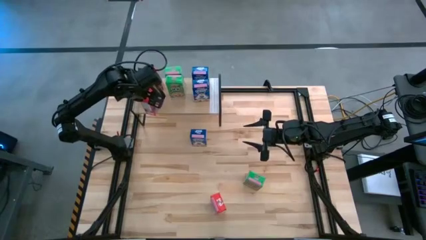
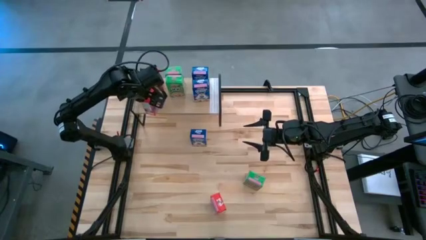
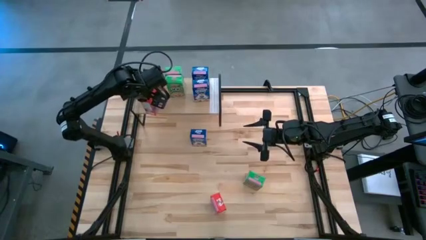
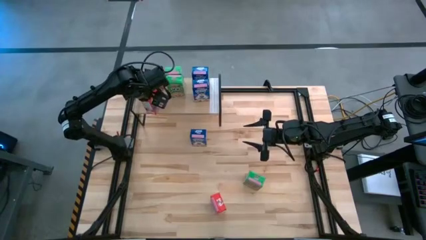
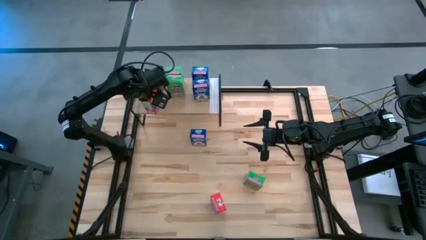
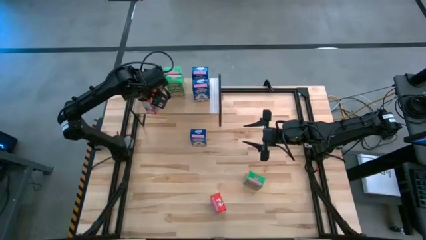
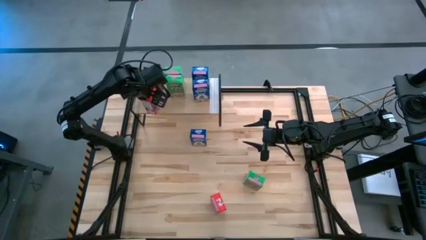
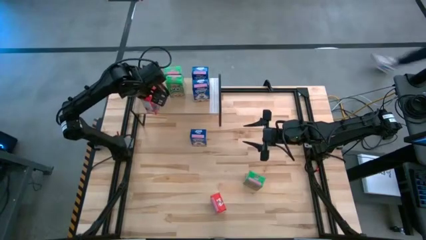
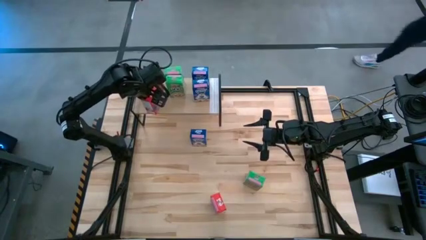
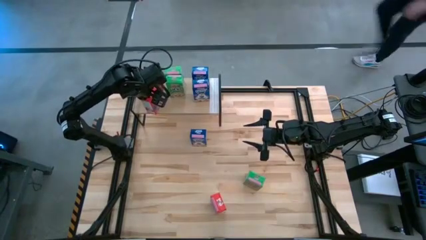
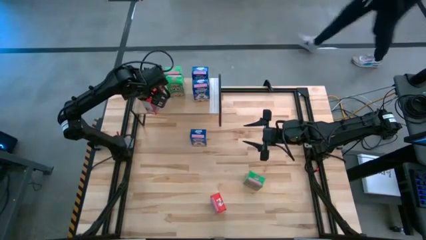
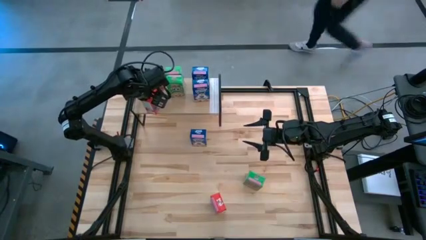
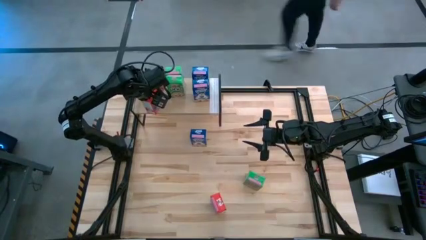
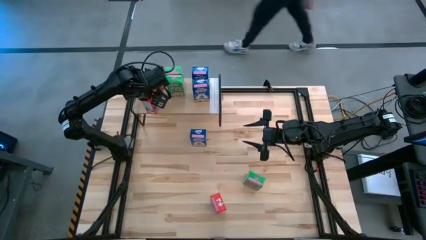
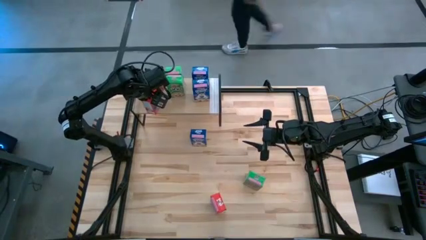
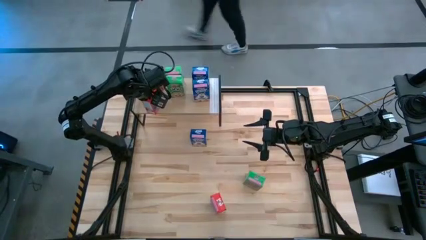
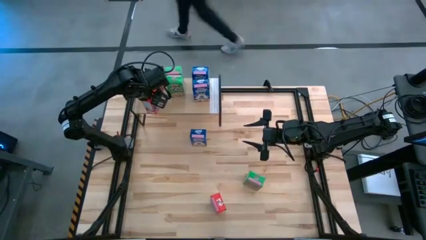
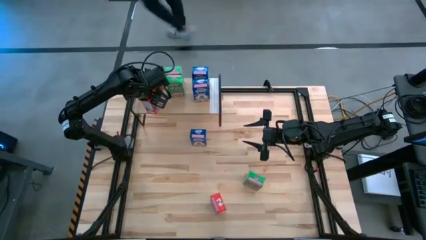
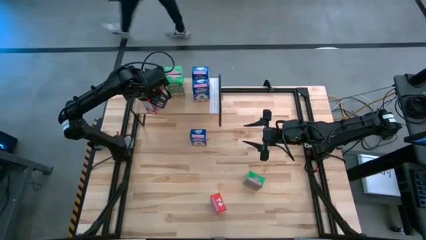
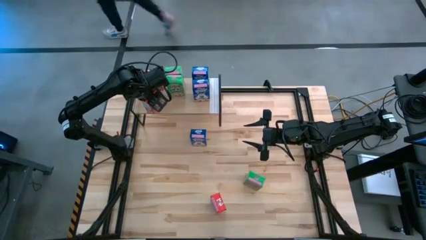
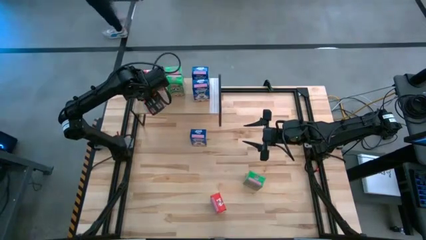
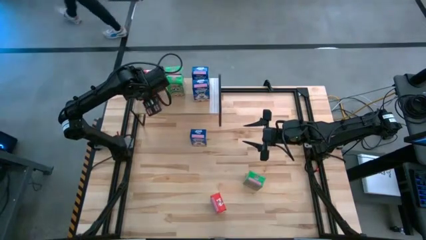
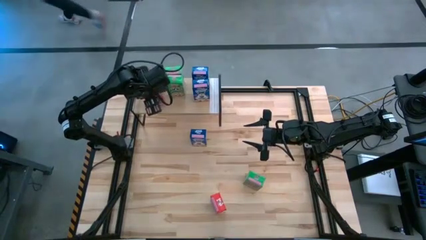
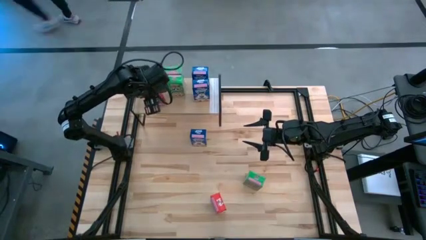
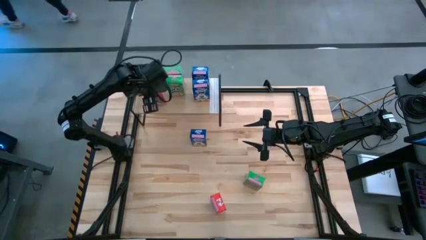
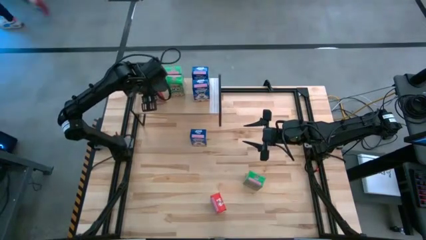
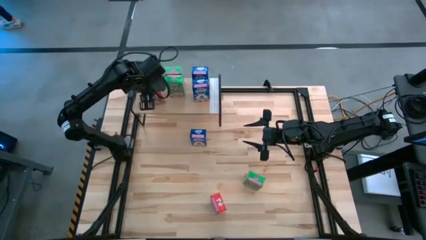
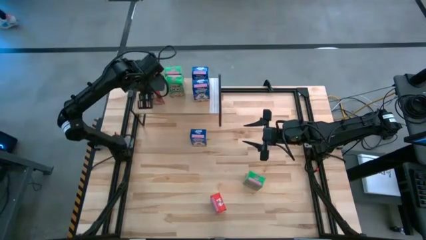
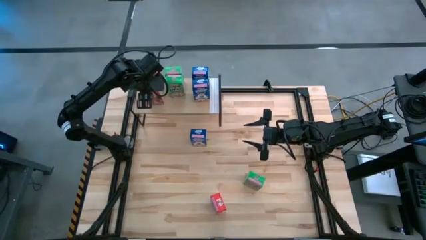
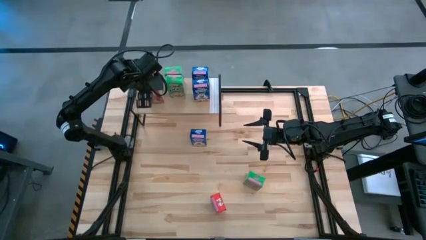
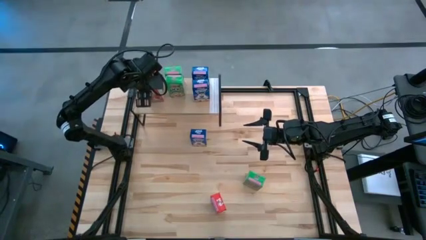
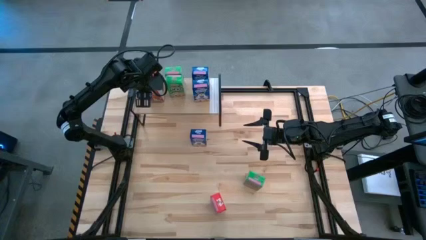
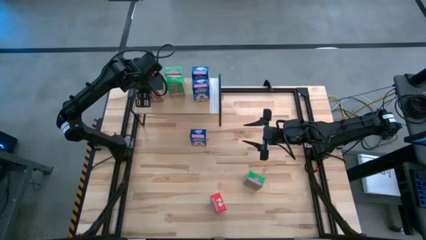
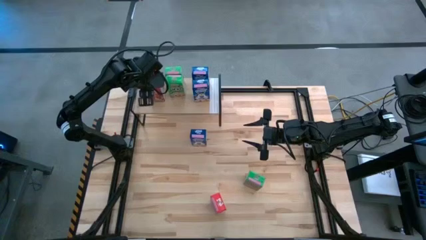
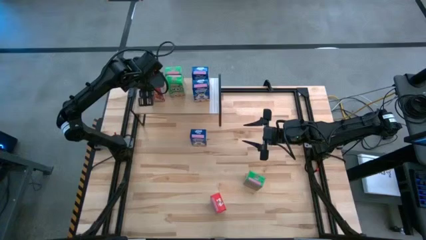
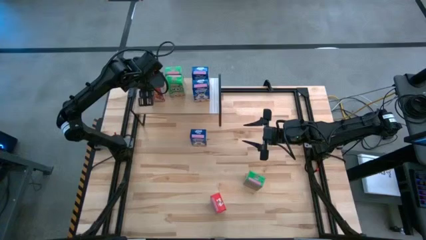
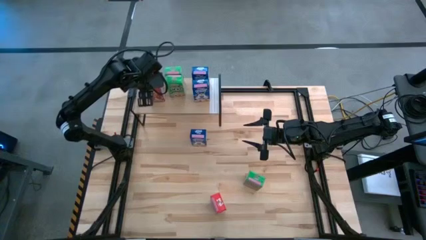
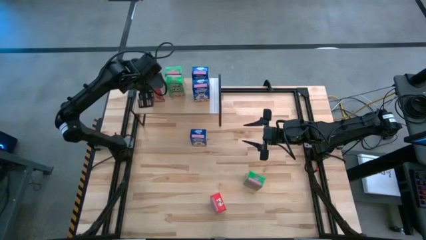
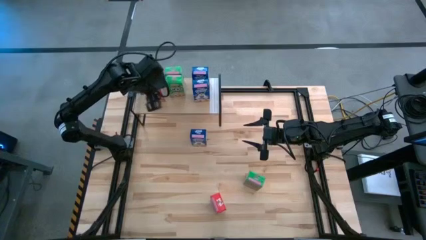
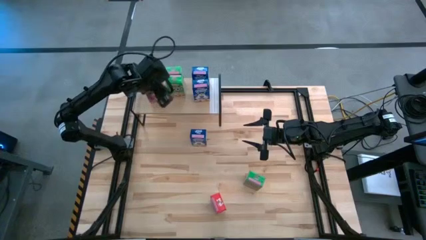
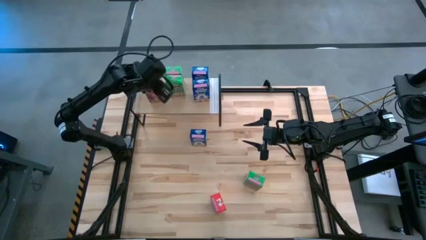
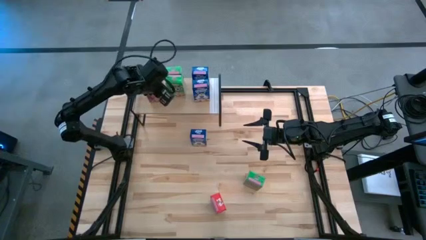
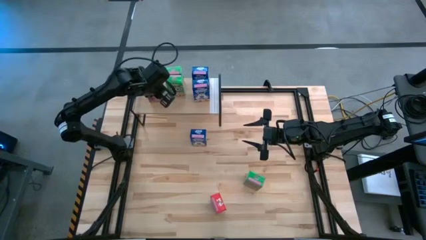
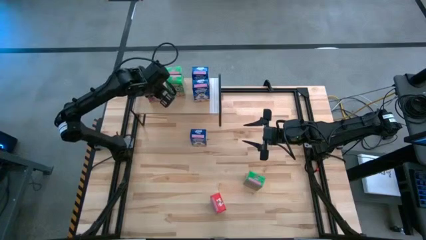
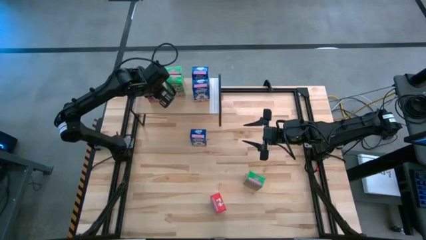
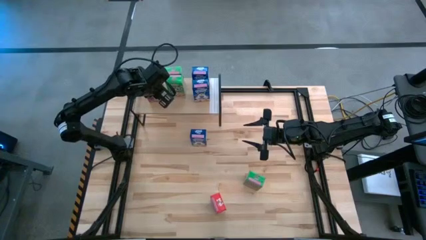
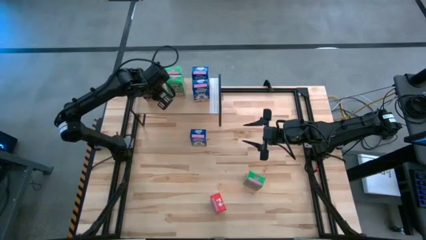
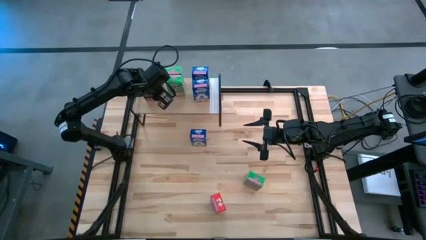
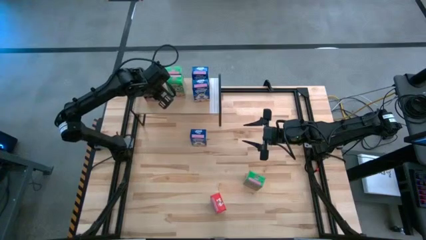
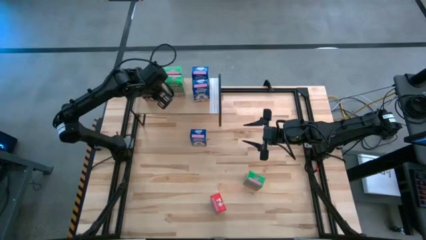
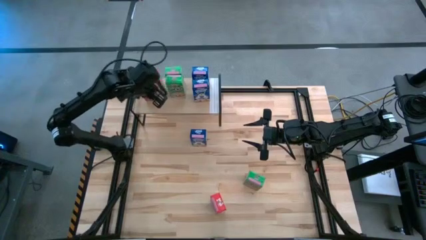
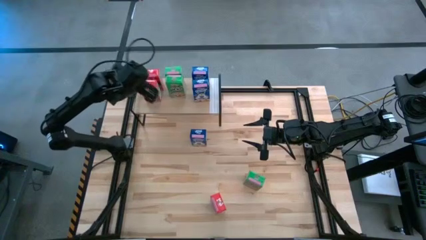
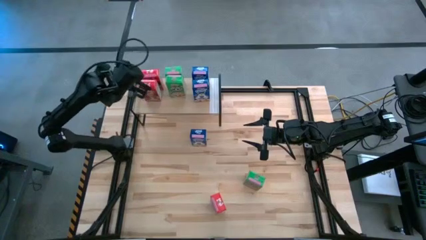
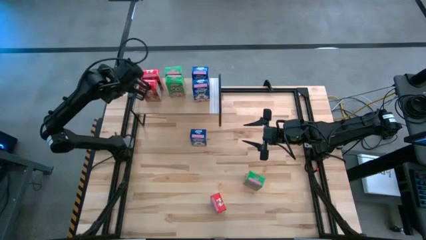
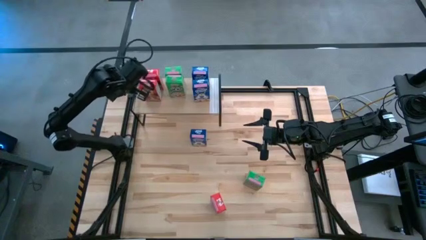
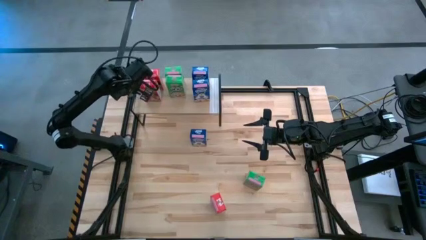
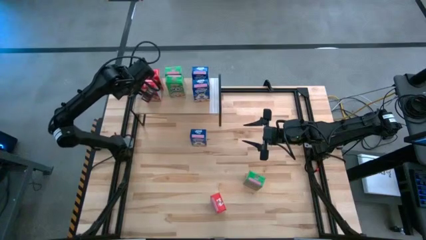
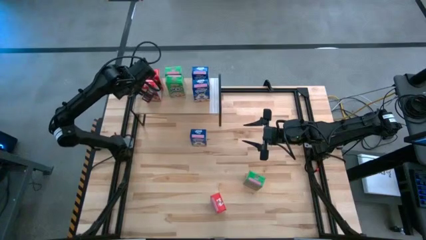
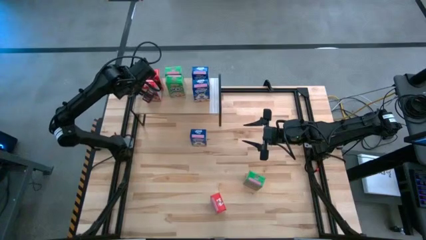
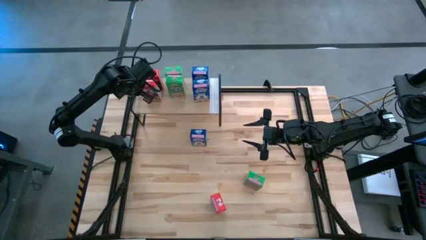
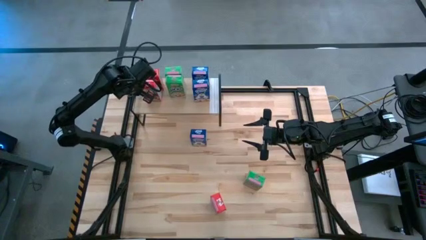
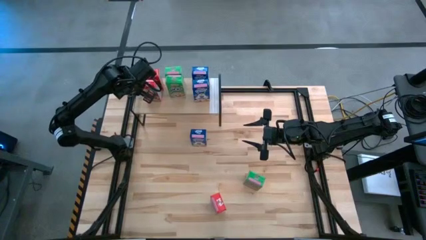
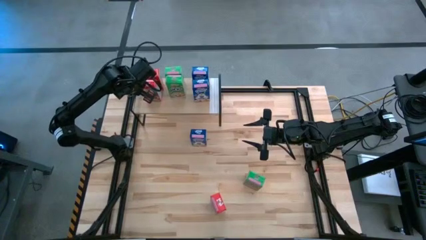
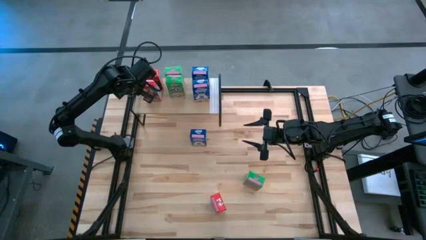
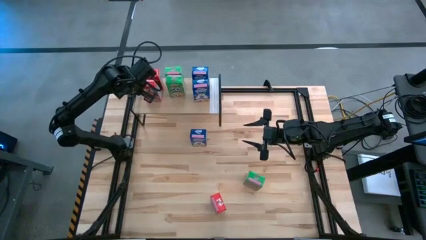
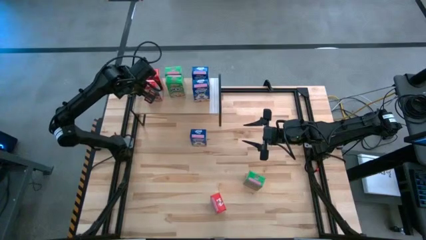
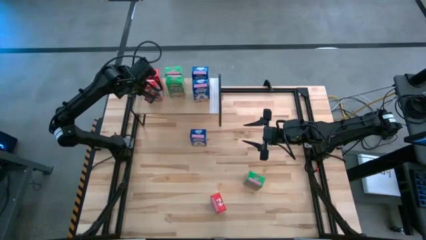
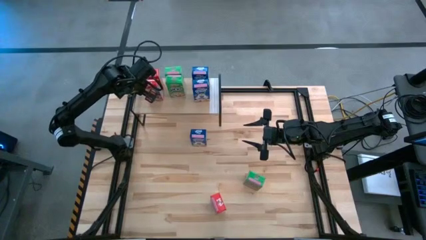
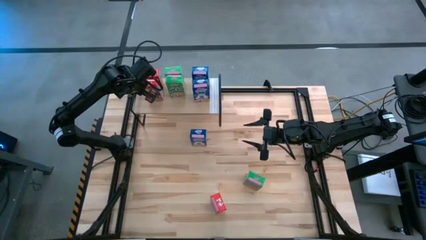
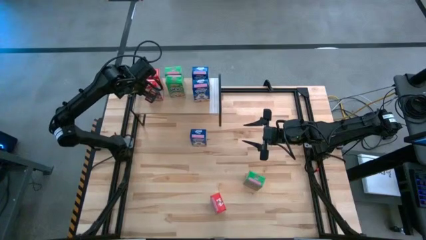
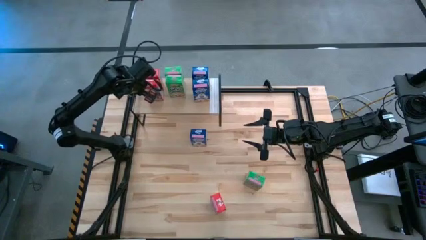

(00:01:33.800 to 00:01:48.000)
Task: Stack cereal on shelf
Put the top red cereal box on the shelf aligned with the other red cereal box

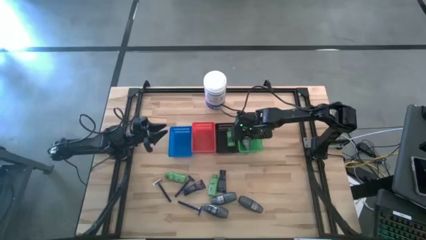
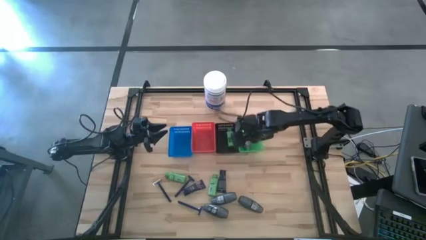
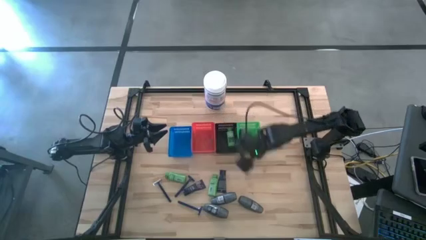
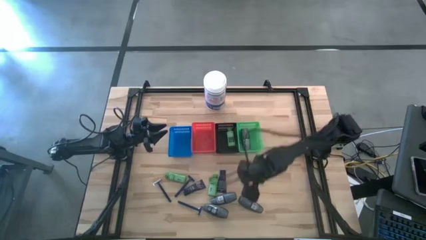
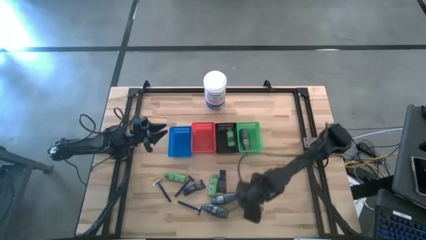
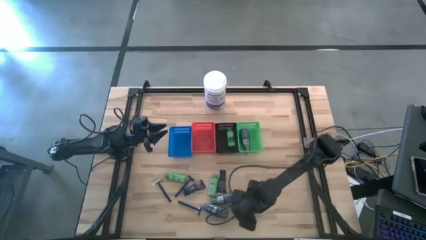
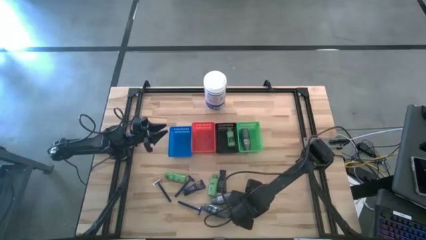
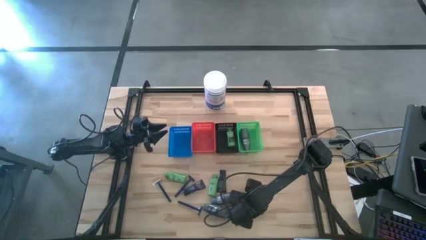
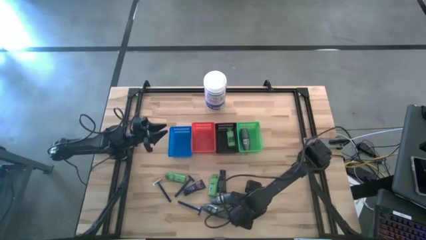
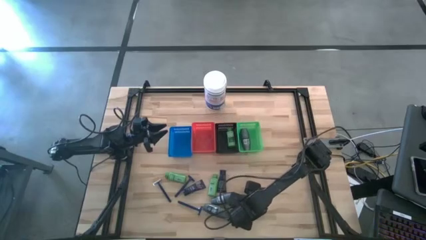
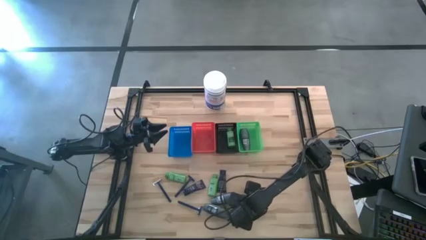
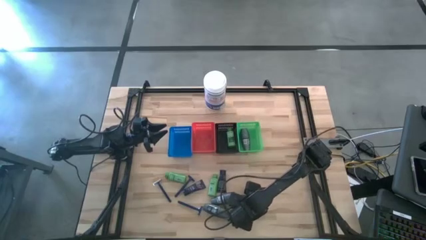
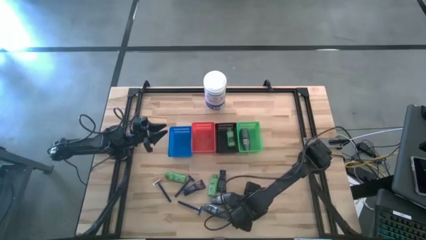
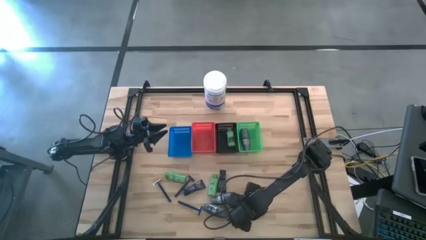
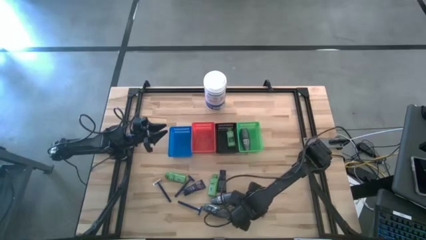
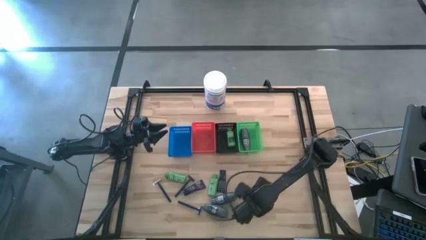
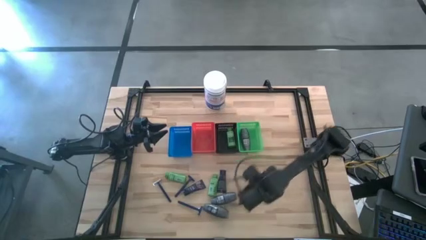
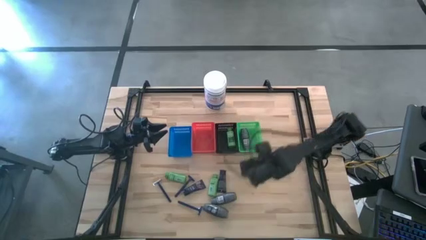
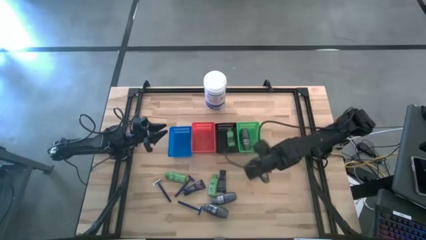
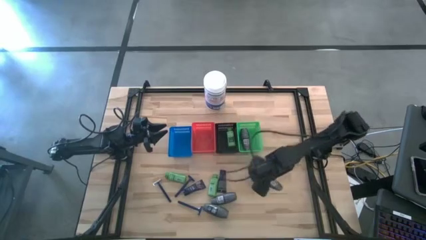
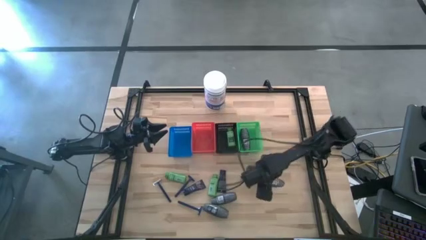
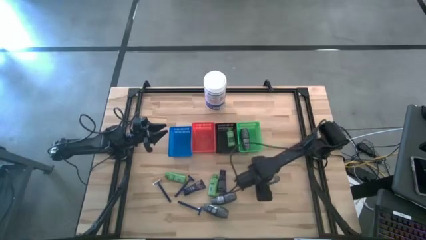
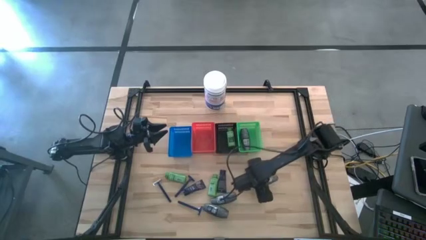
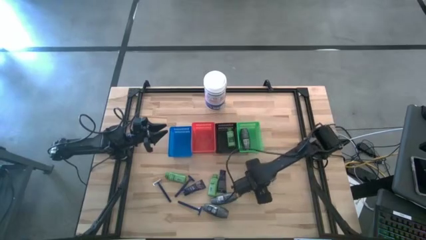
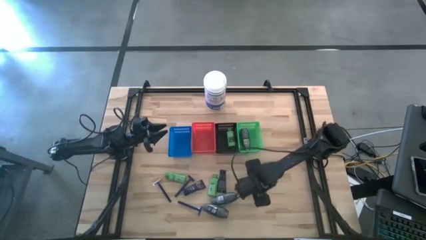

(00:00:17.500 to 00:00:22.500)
Task: Pick & Place Travel size toiletries
Put the black deodorant into the green basket
